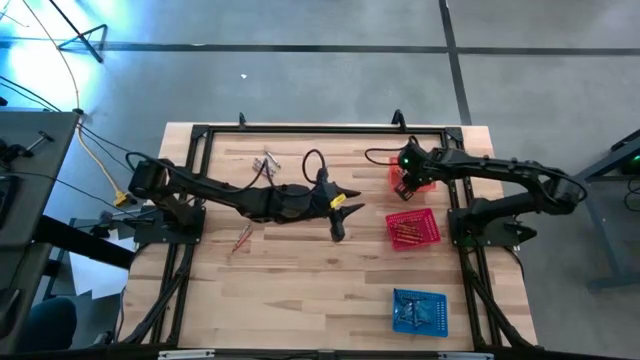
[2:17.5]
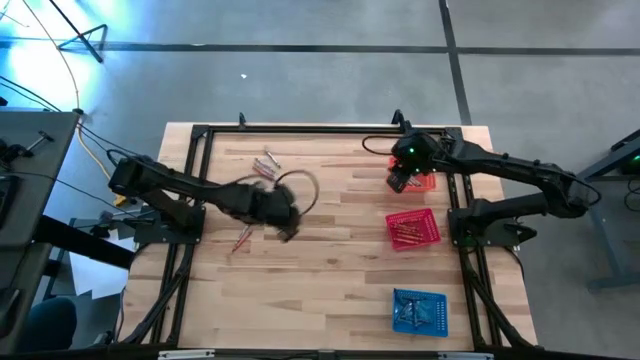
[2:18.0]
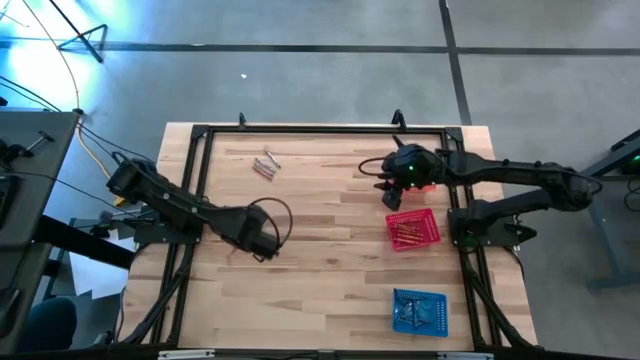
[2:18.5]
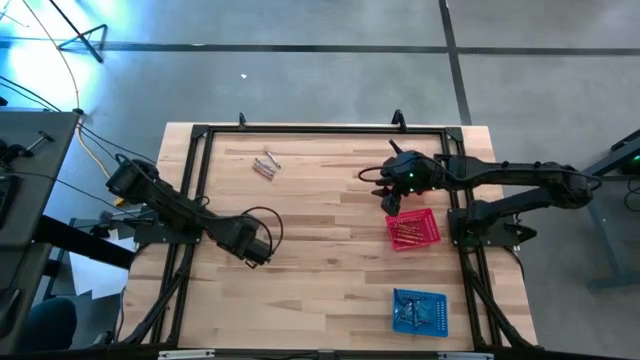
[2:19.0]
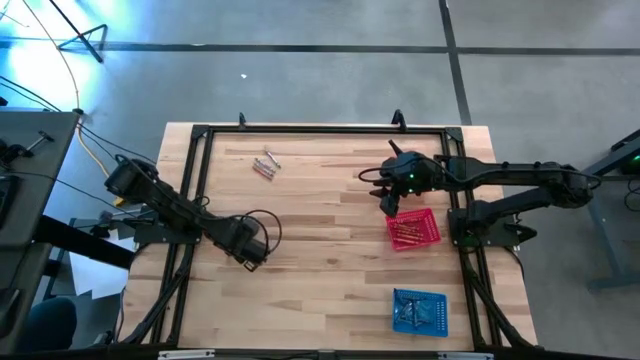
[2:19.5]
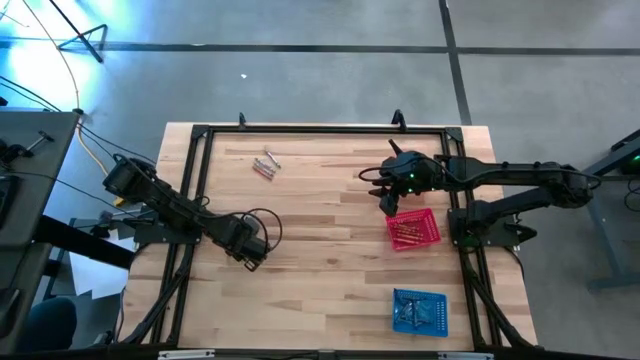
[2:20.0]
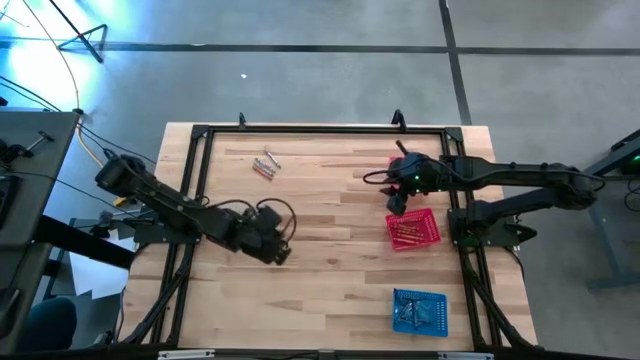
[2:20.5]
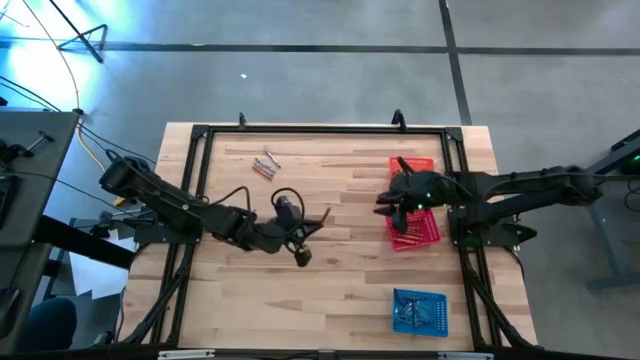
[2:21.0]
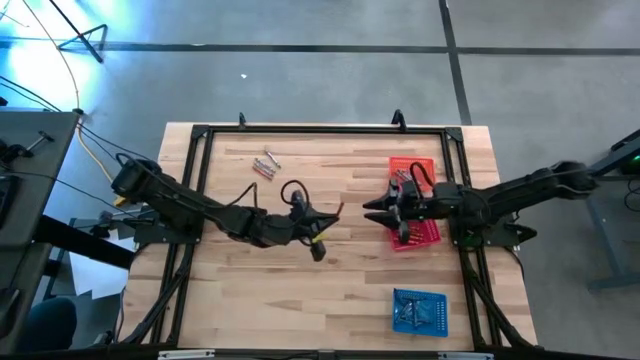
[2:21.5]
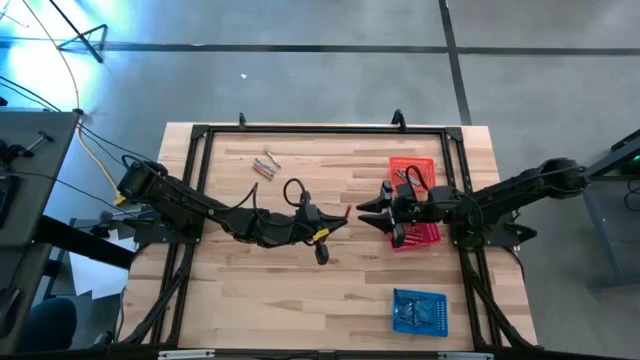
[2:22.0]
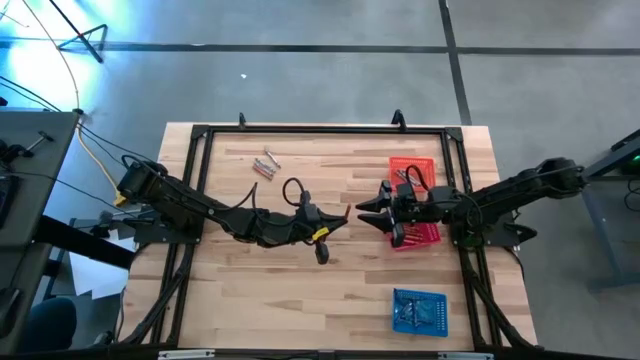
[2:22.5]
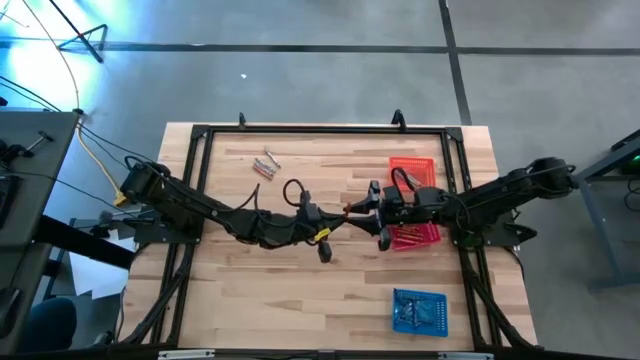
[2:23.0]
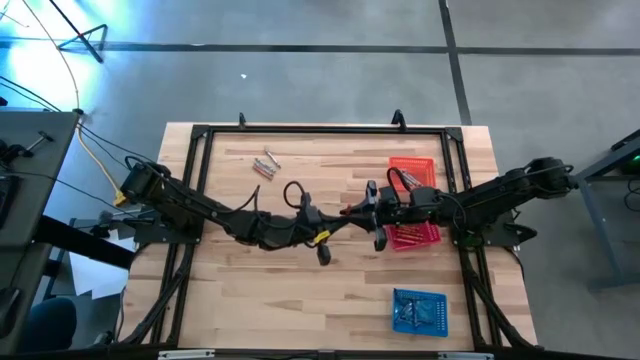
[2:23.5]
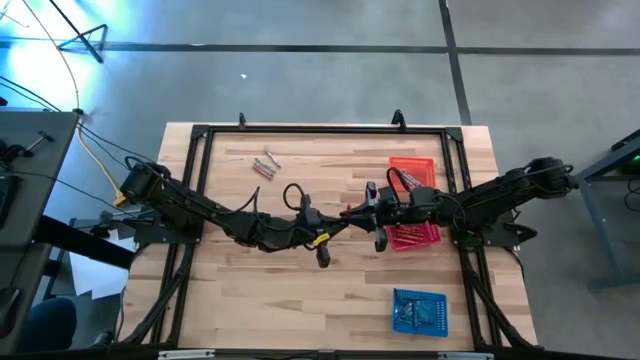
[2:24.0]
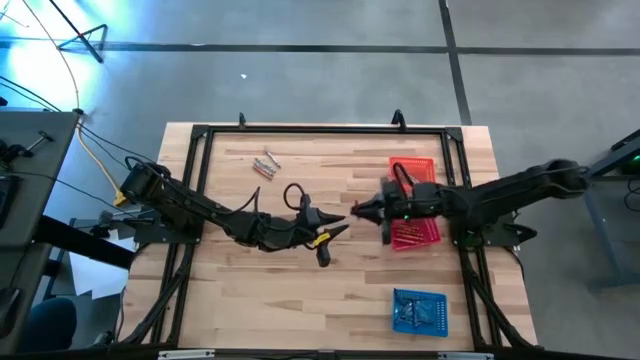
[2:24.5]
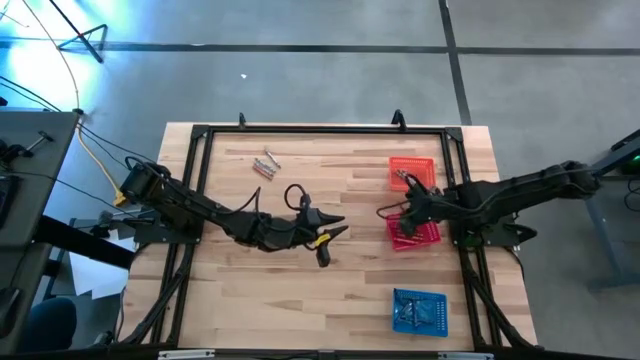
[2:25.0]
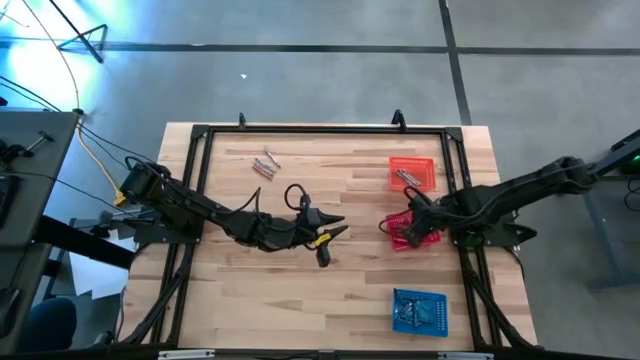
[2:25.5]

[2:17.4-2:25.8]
Task: Sort crayons
Put the orange crayon into the red bin

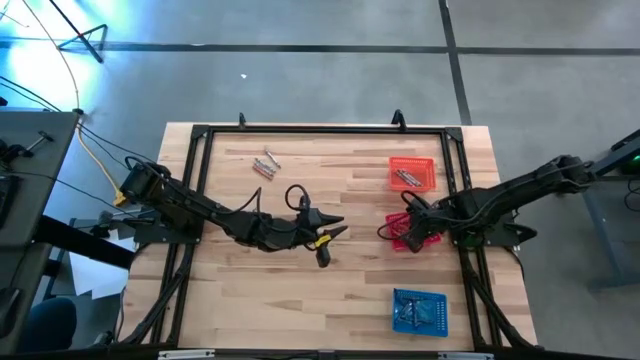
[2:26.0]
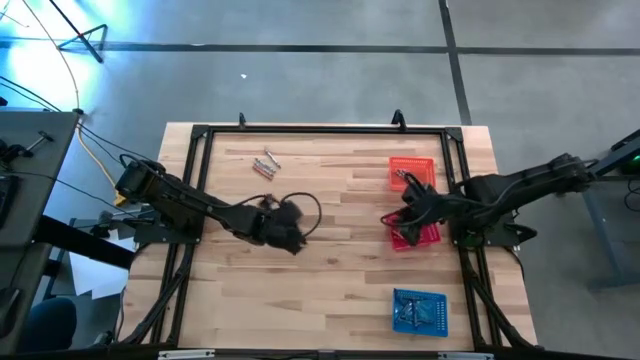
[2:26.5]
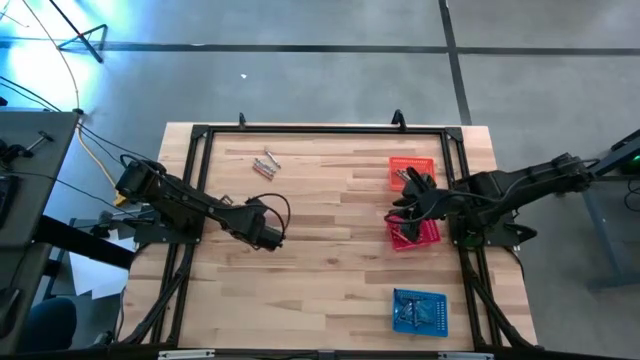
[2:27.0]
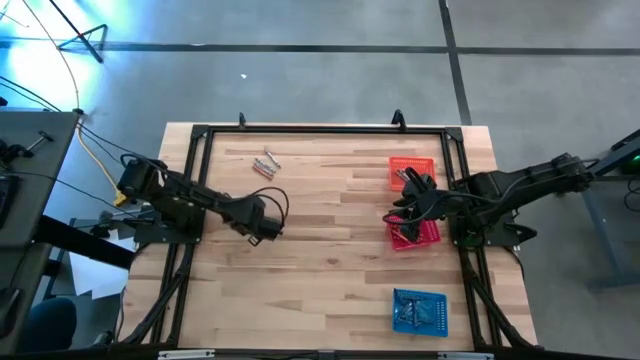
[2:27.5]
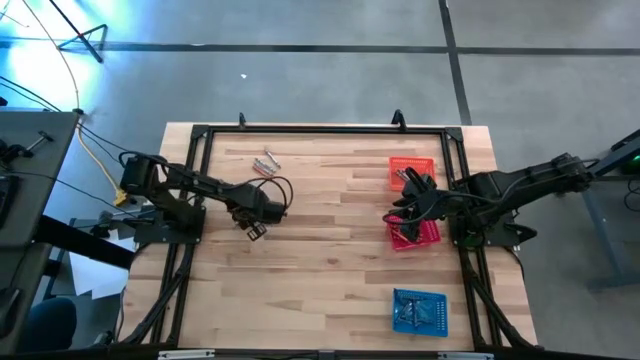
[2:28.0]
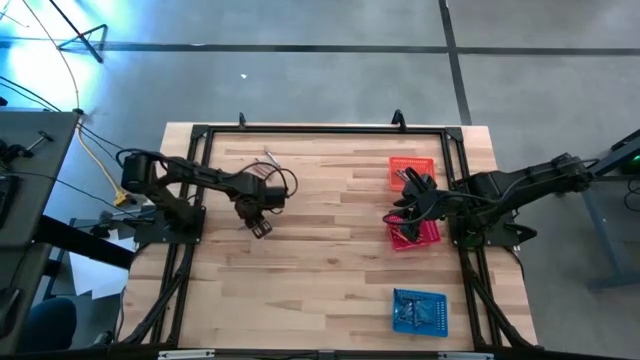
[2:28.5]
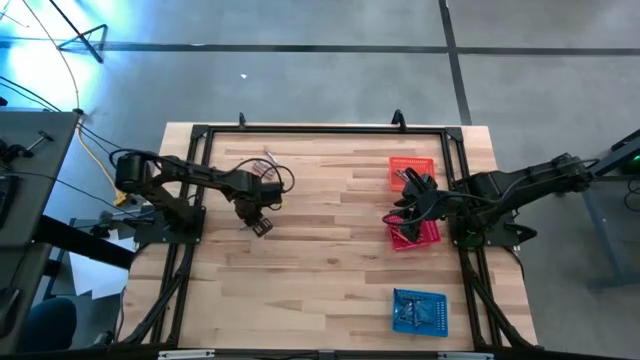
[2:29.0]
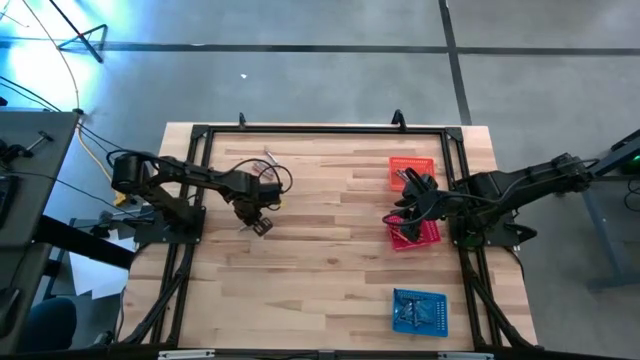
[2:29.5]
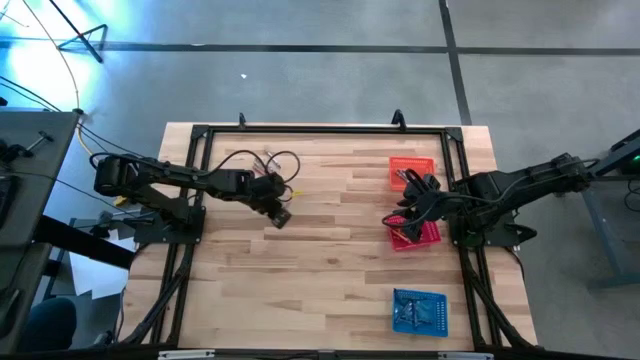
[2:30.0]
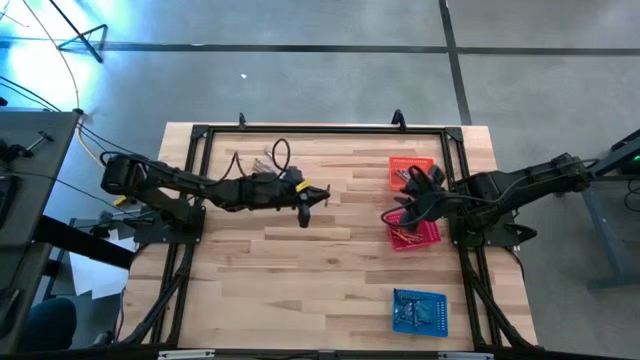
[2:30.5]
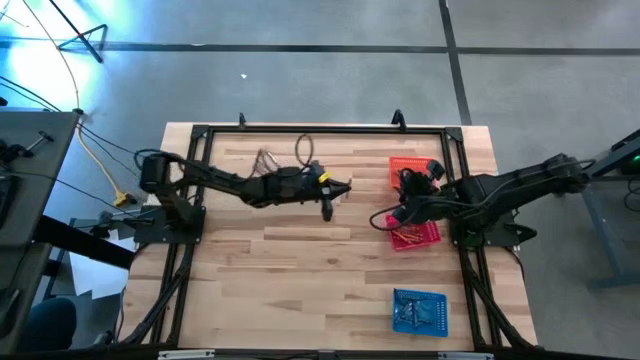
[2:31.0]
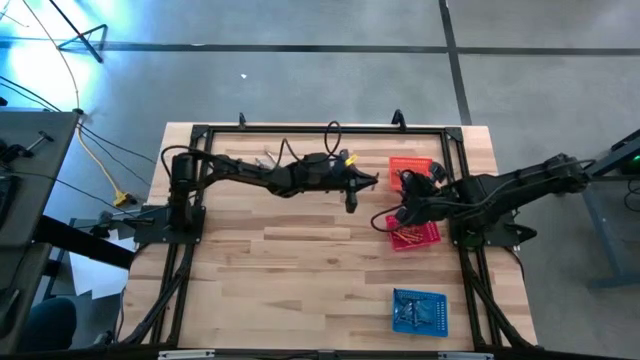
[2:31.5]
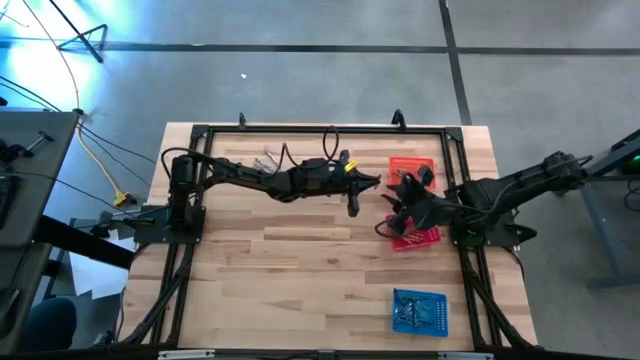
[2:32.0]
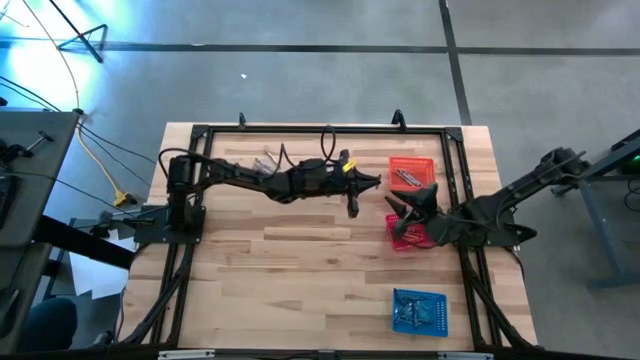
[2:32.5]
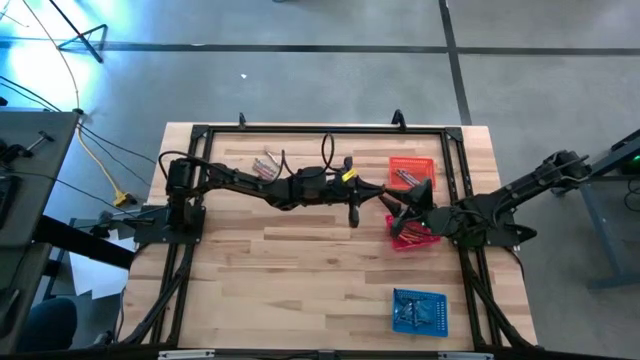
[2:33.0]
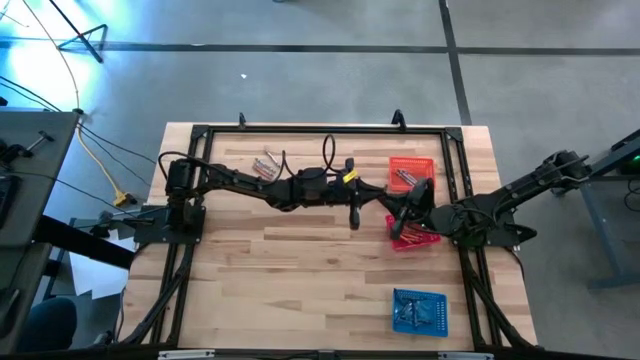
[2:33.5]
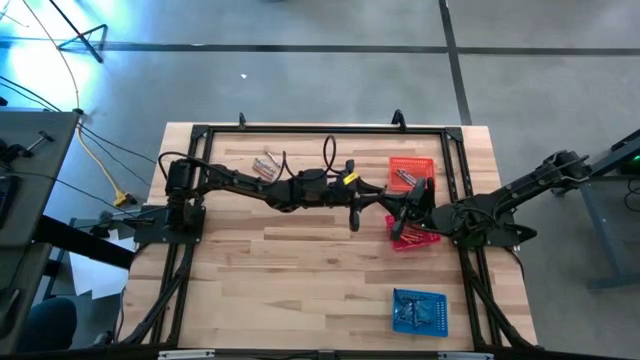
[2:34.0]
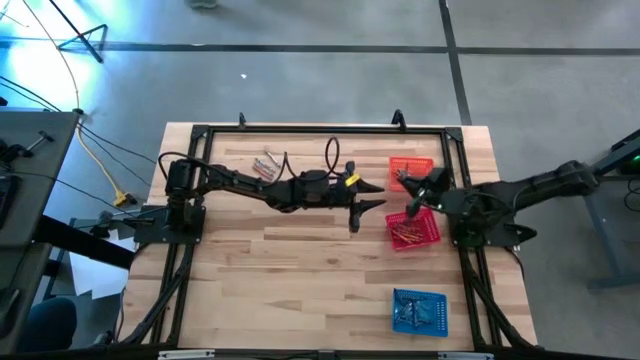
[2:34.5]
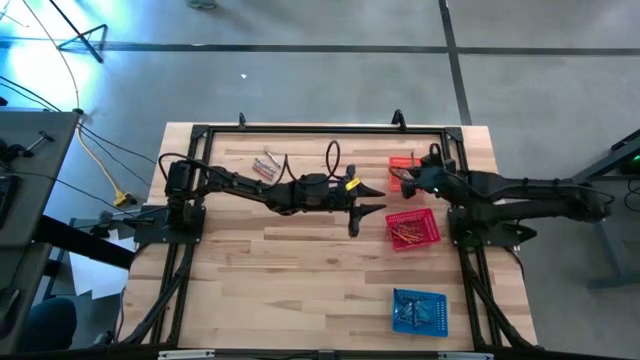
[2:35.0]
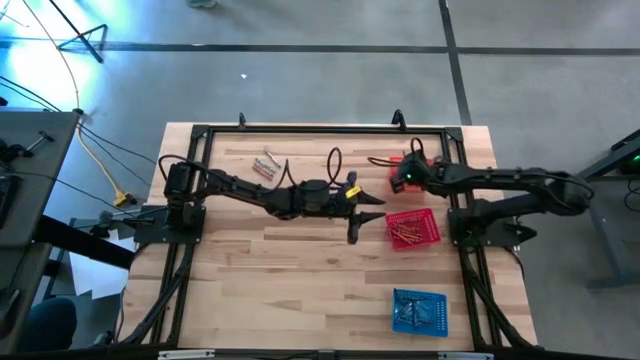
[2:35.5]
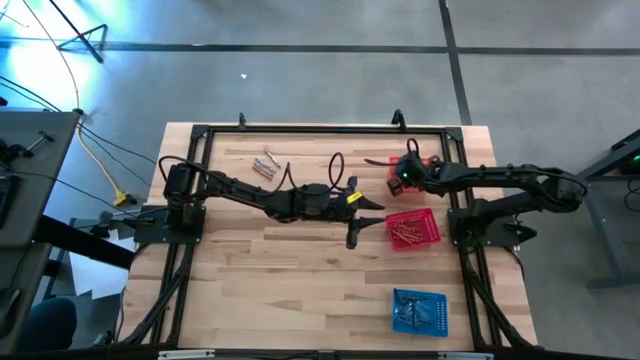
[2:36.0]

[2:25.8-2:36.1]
Put the gray crayon into the orange bin

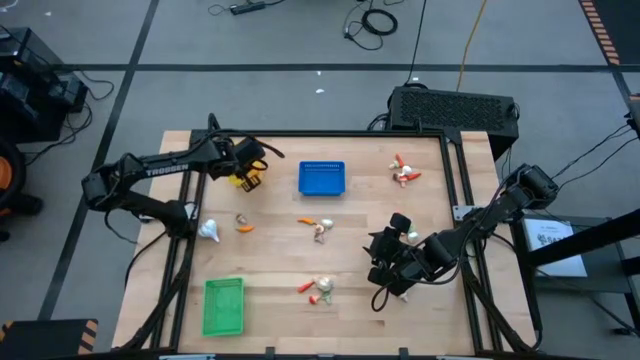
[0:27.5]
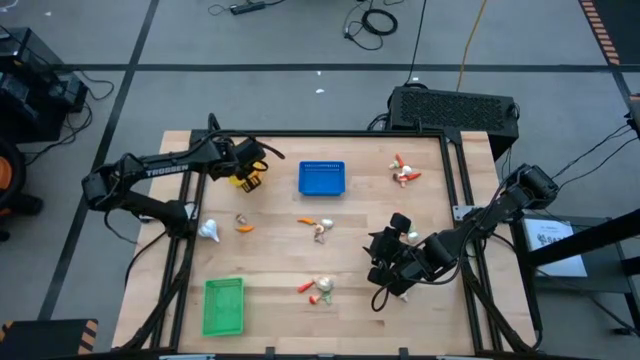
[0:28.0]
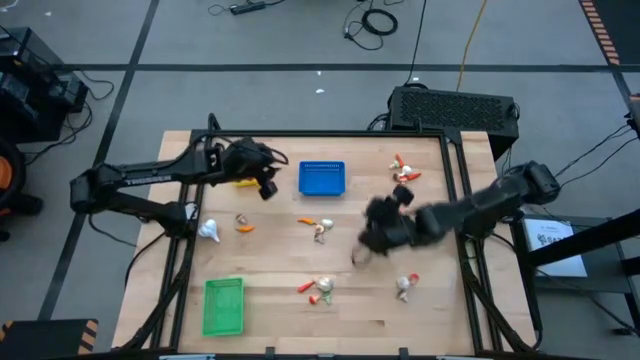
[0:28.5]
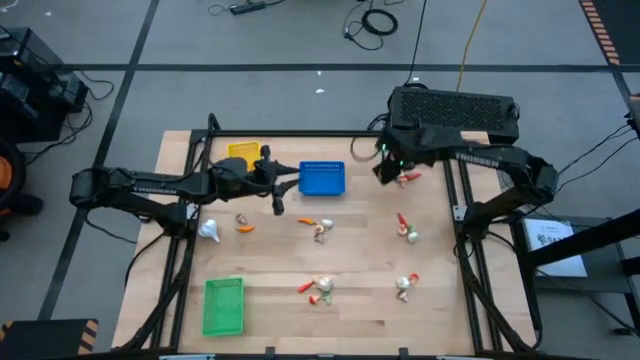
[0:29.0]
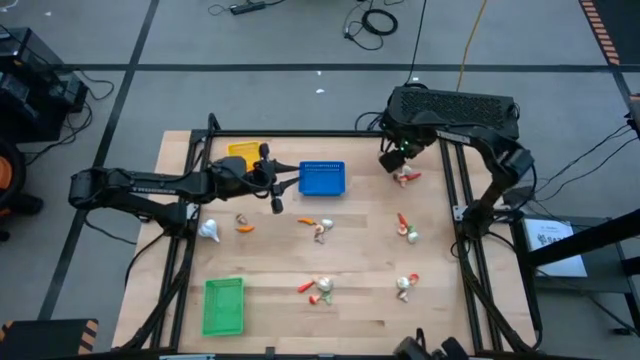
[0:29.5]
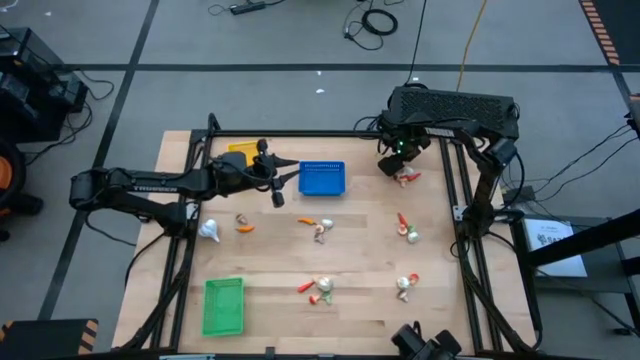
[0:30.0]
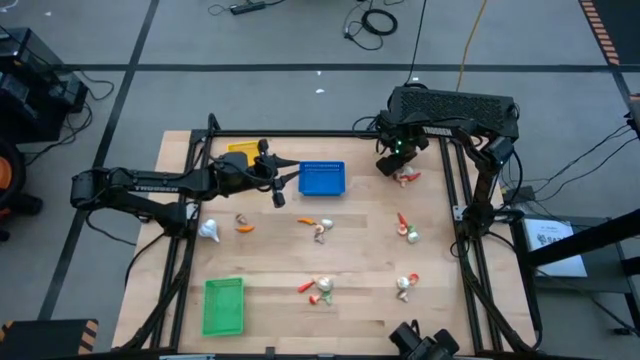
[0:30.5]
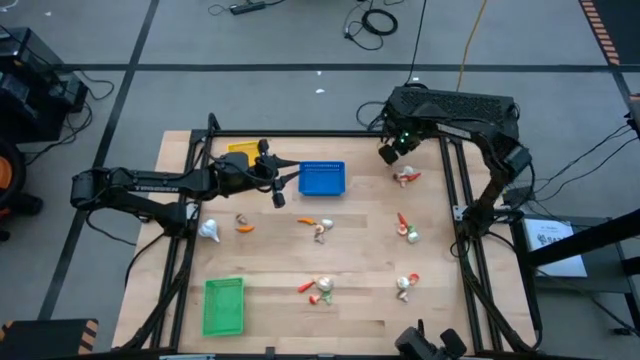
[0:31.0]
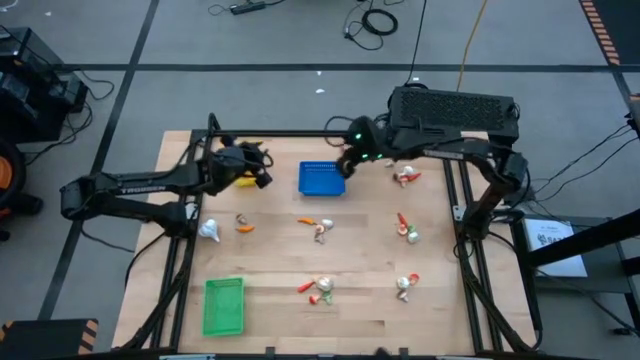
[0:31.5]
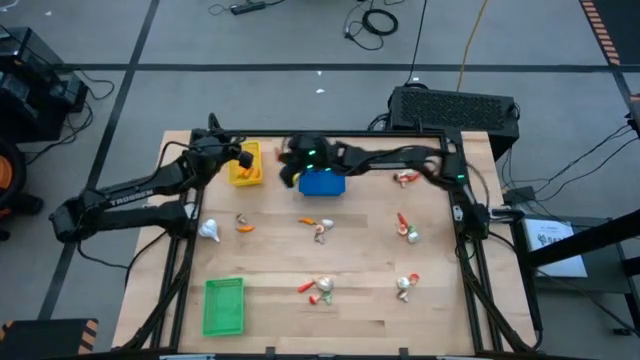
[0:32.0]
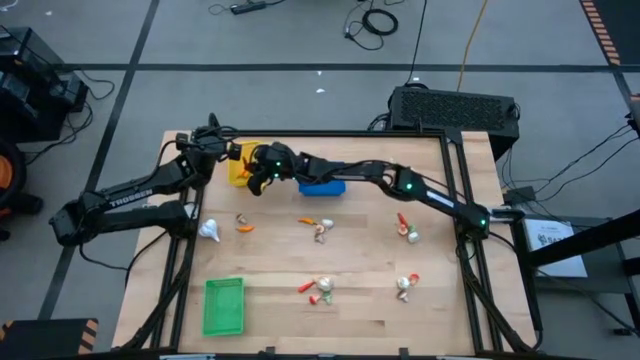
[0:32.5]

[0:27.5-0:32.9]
Task: Sort produce into baskets
Put the orange chili pepper into the yellow bin
